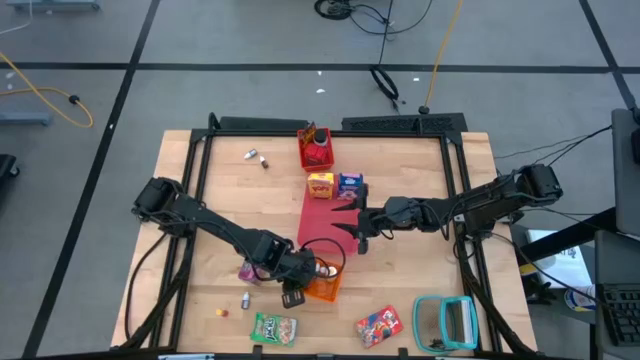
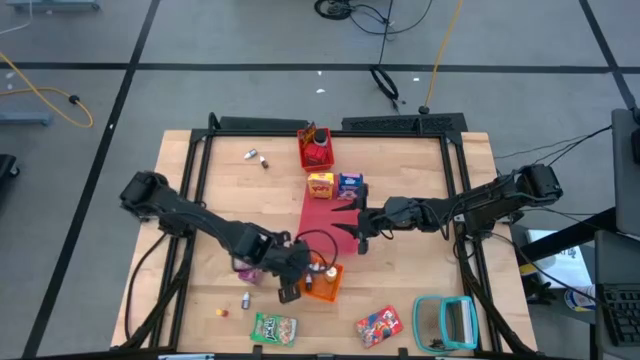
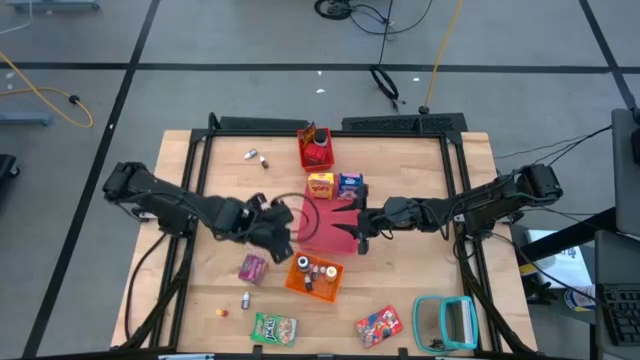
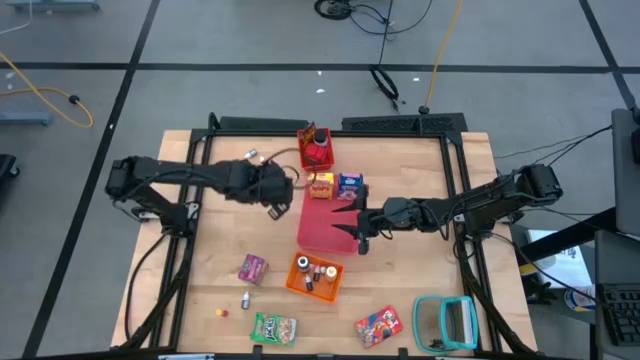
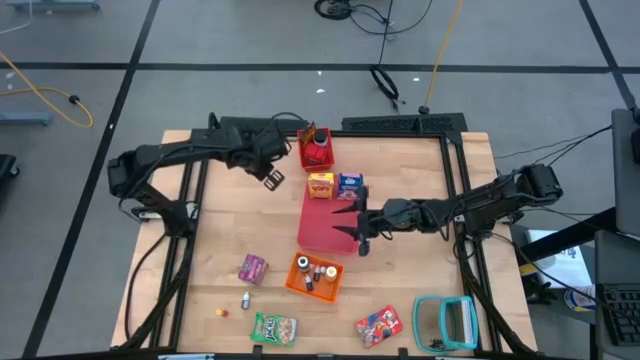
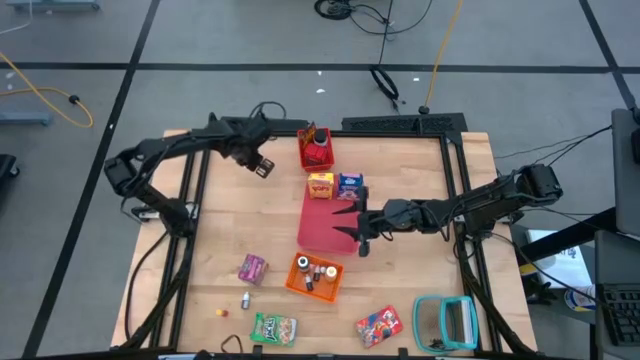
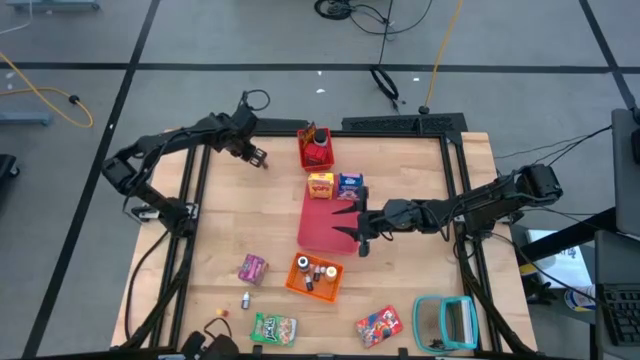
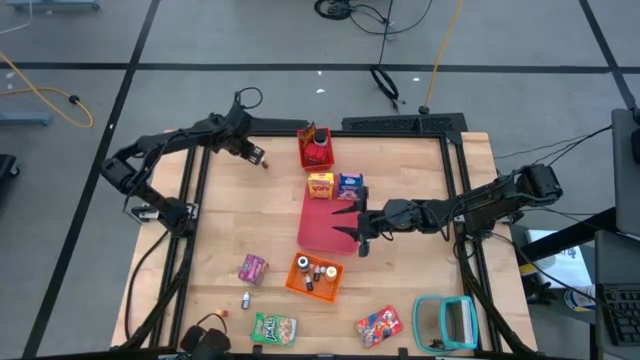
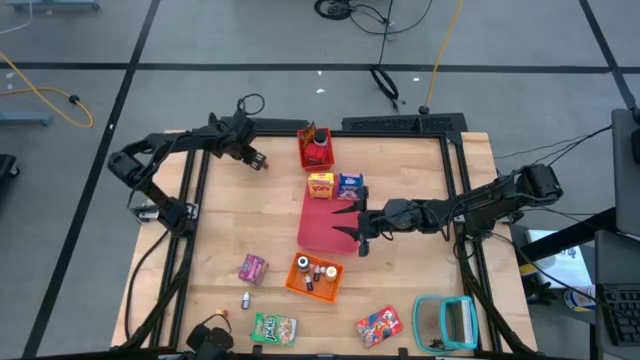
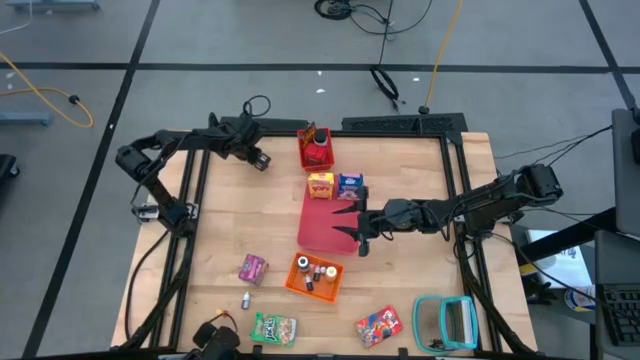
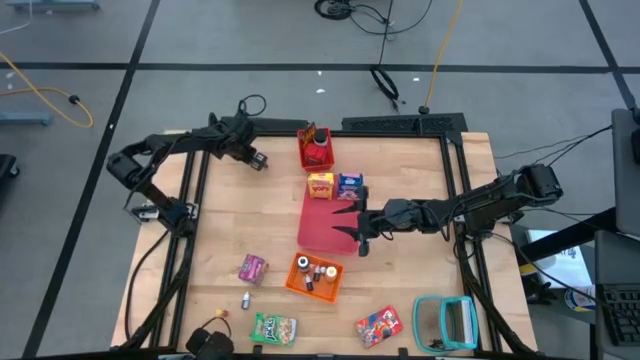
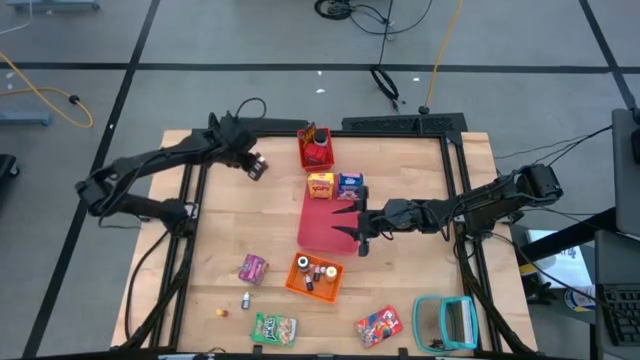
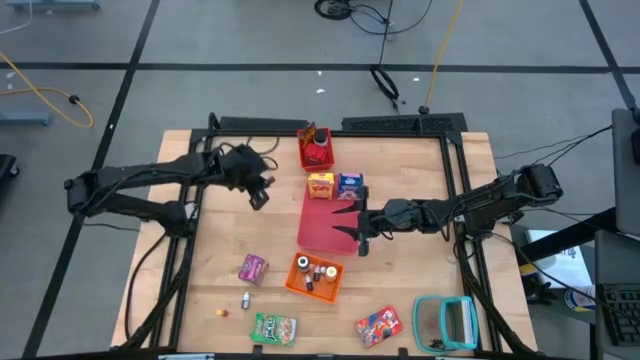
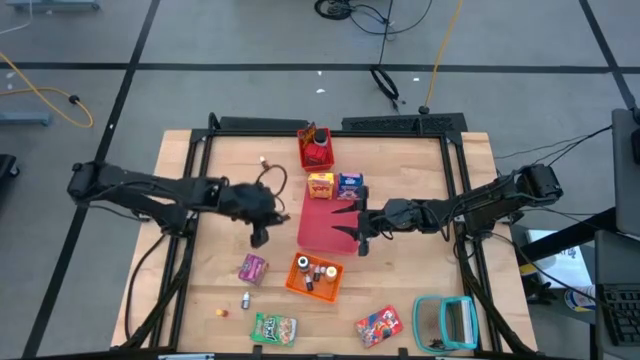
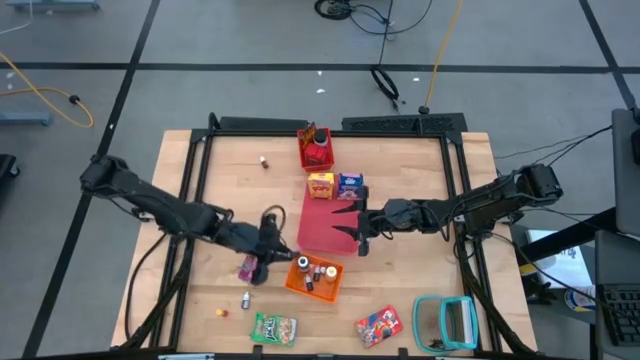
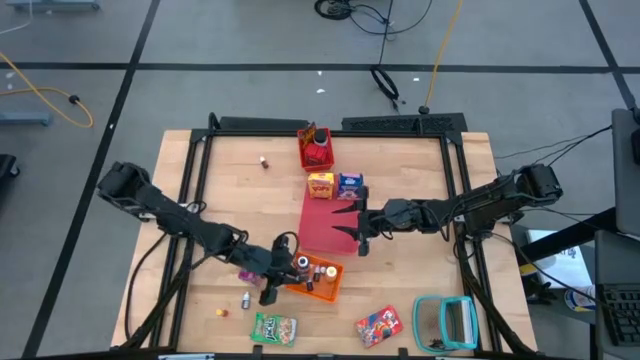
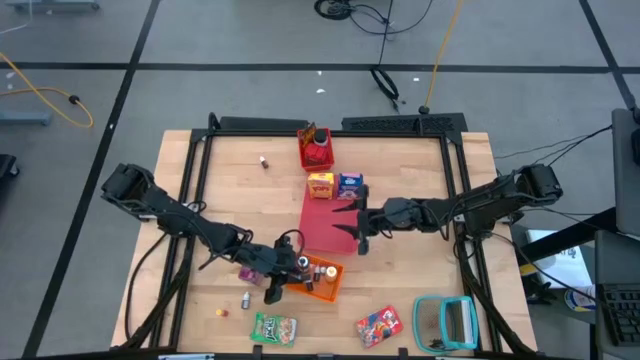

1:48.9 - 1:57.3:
Task: Pick & Place Kitchen Items
Put the small brown food coloring bottle into the orange bin

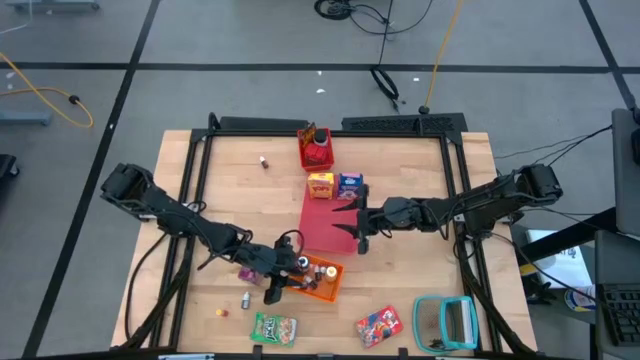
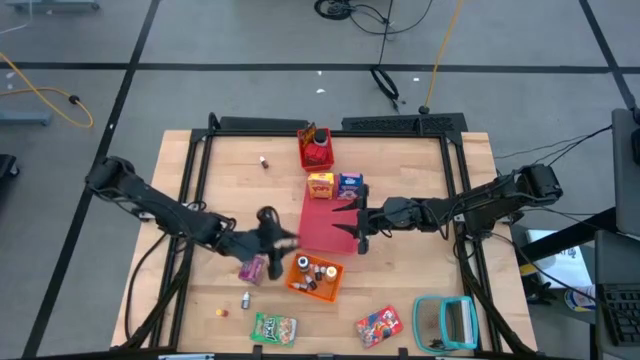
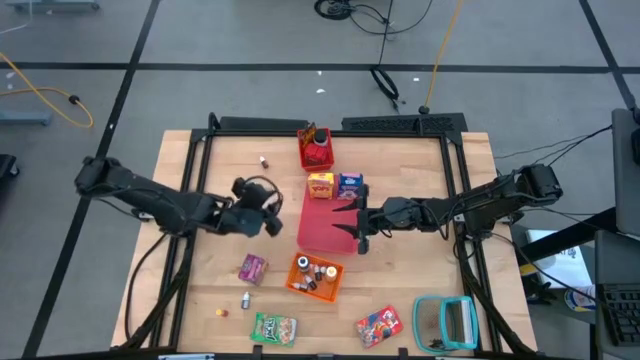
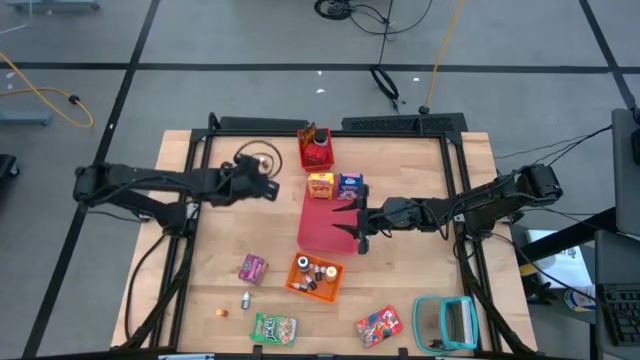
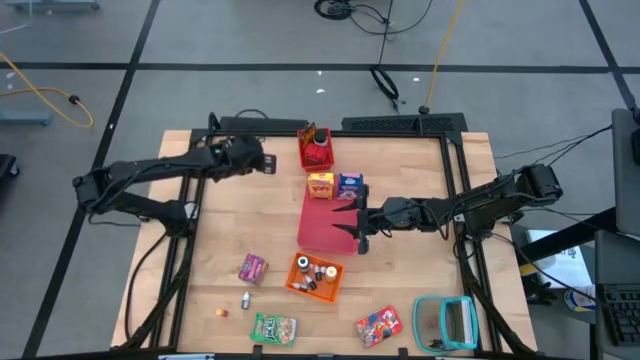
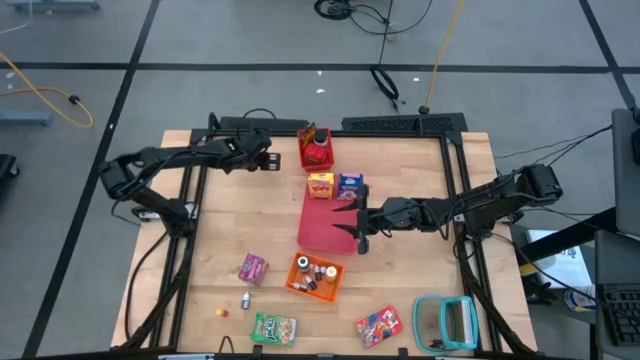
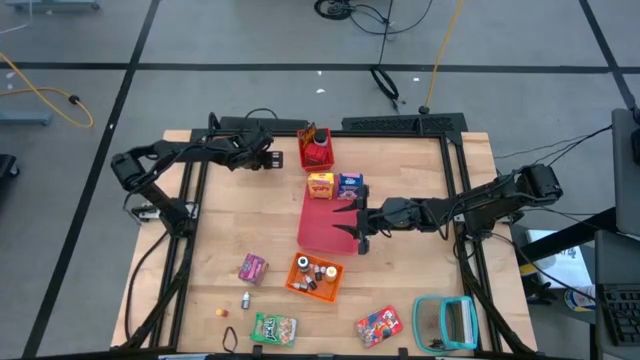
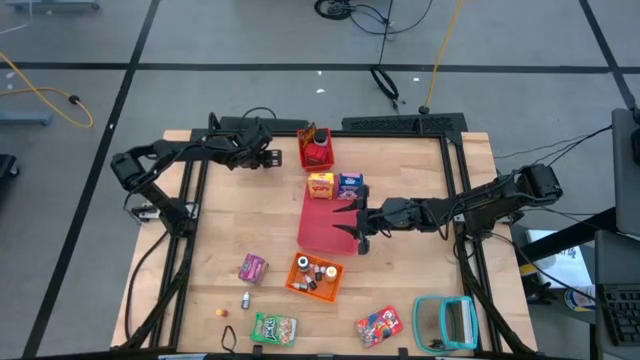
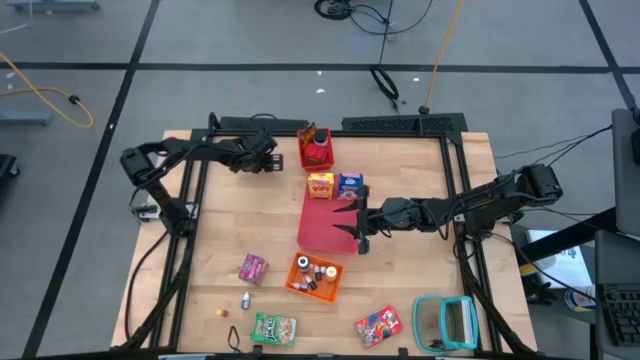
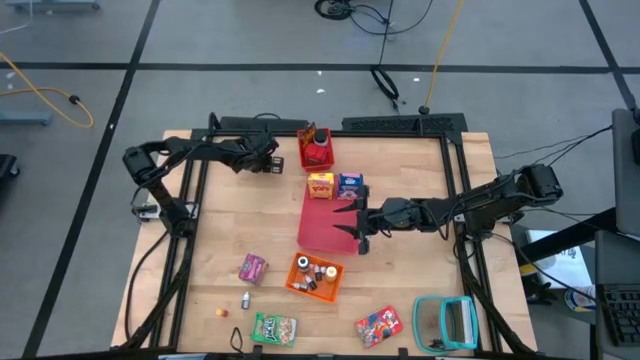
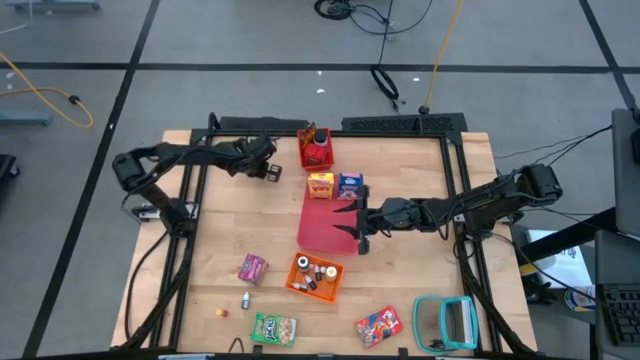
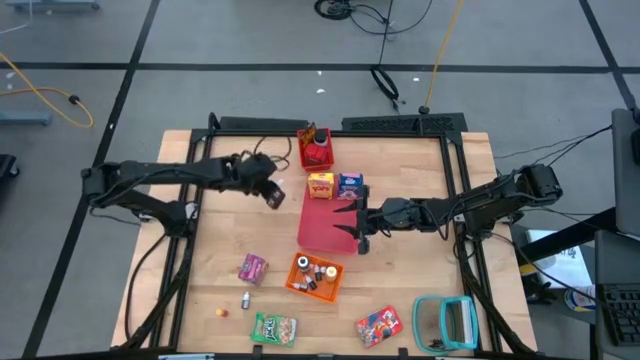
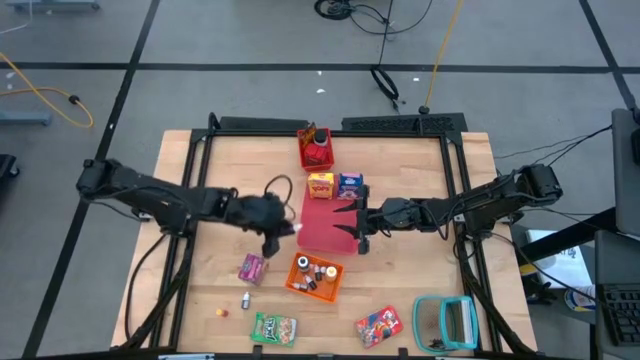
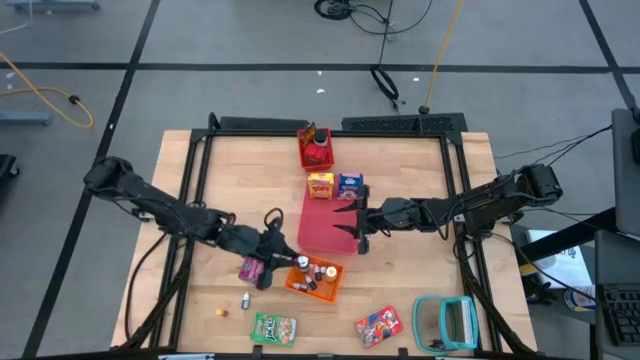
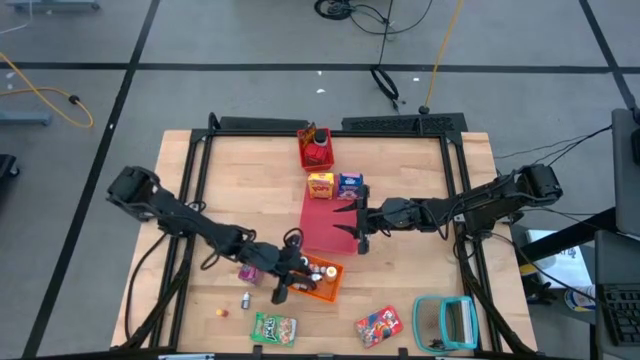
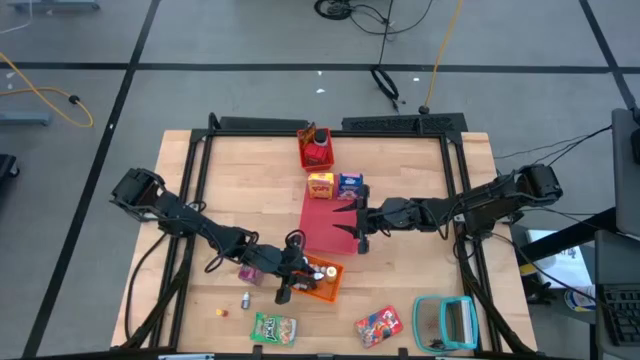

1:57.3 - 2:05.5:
Put the small orange food coloring bottle into the orange bin

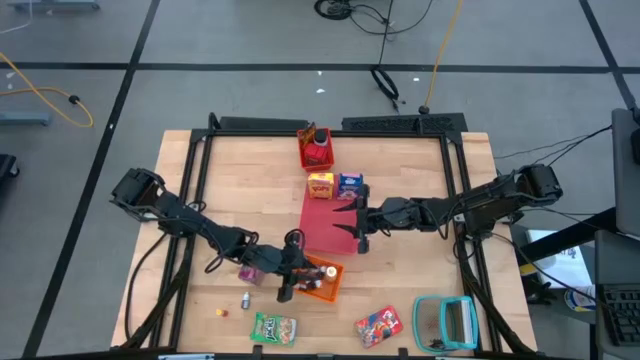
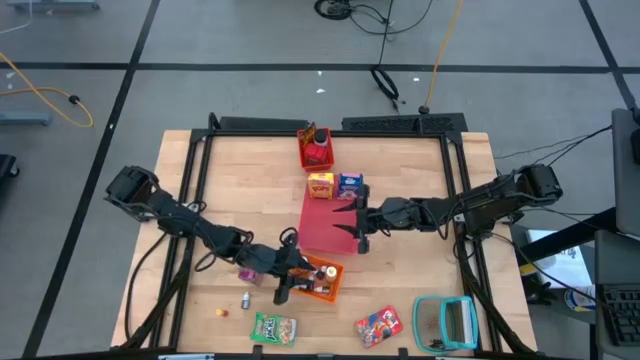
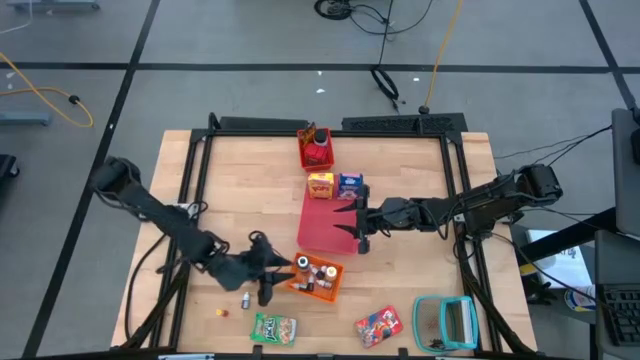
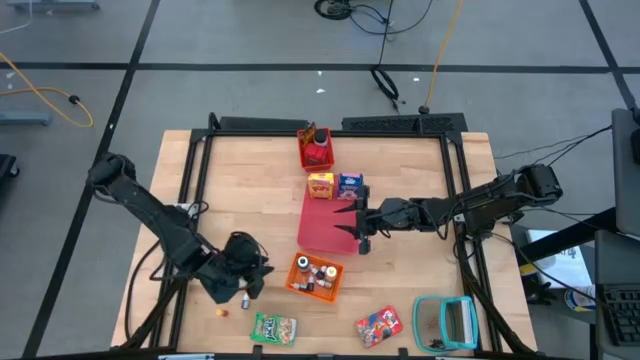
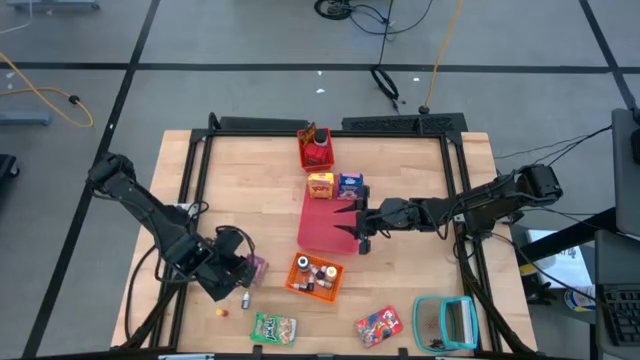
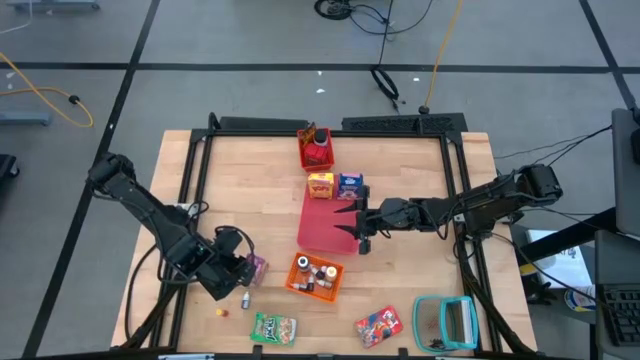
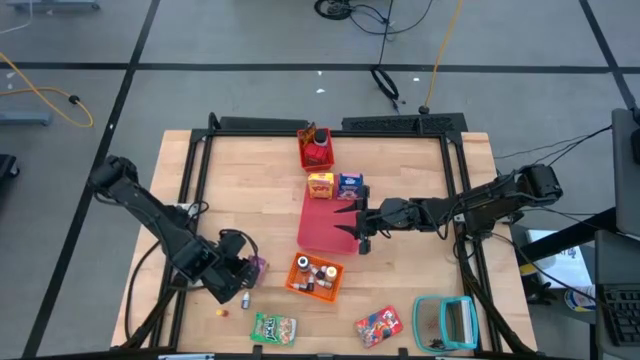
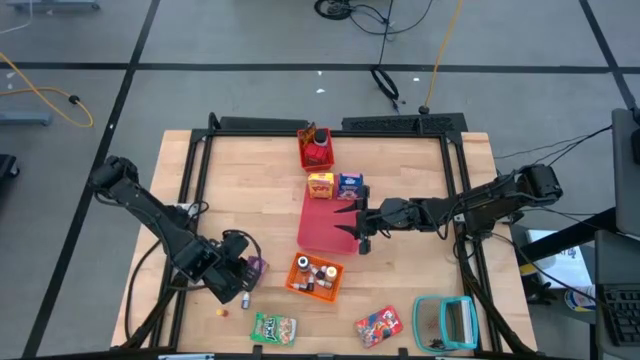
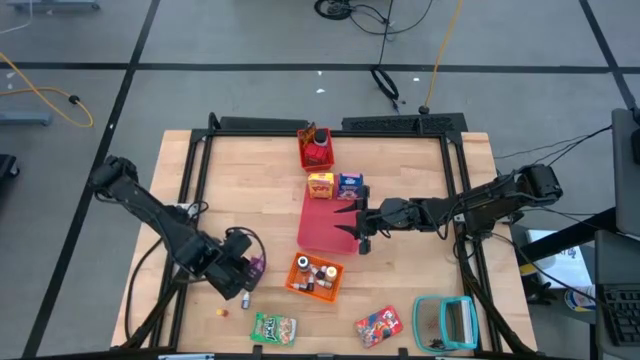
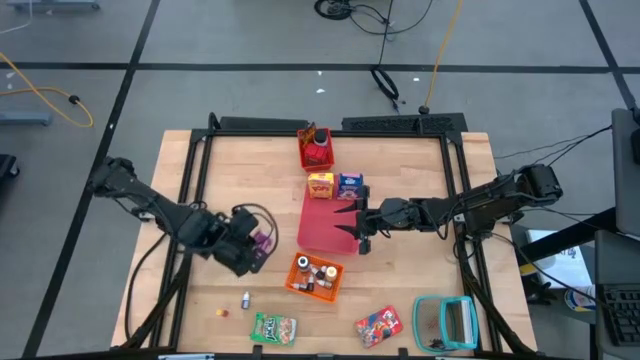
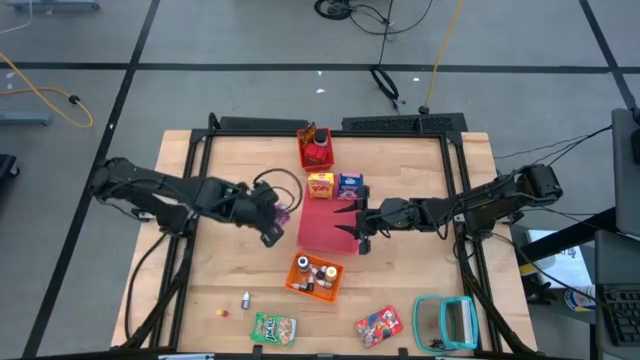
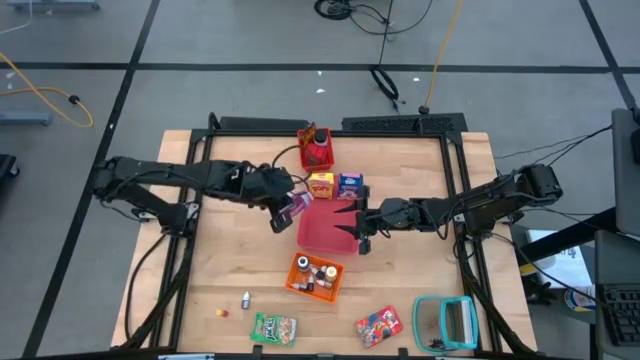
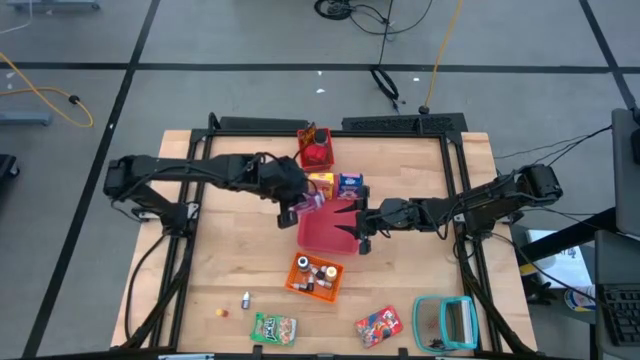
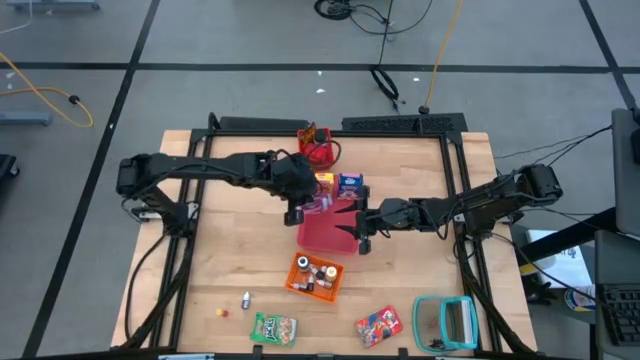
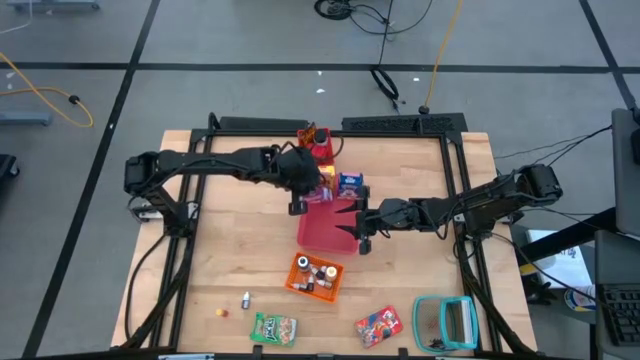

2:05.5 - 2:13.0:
Put the violet cereal box into the pink bin
